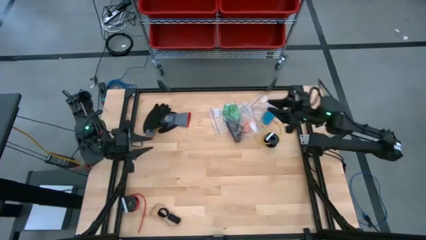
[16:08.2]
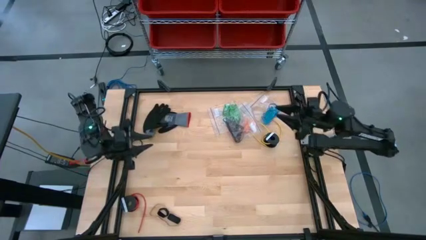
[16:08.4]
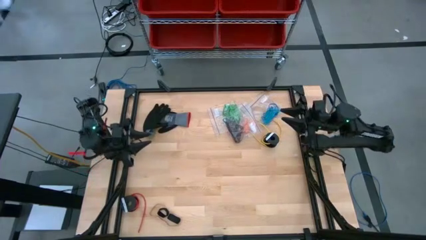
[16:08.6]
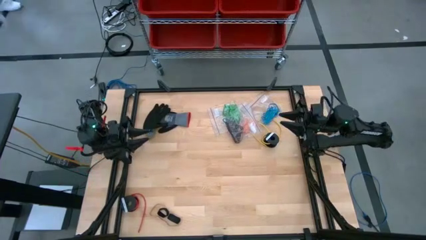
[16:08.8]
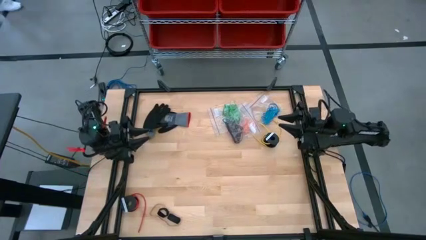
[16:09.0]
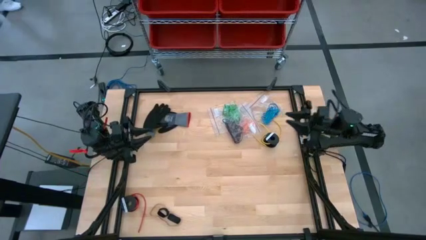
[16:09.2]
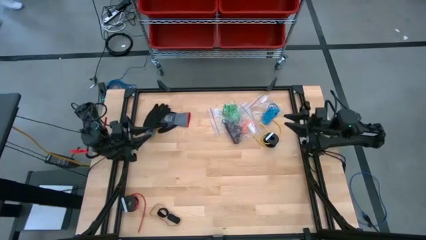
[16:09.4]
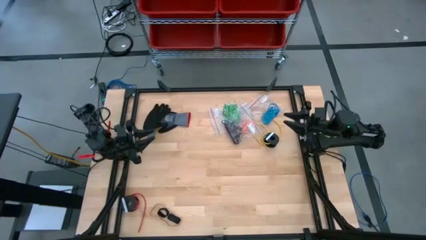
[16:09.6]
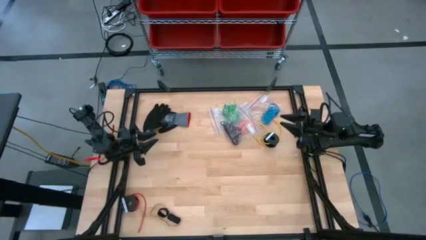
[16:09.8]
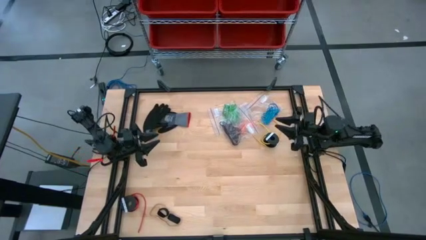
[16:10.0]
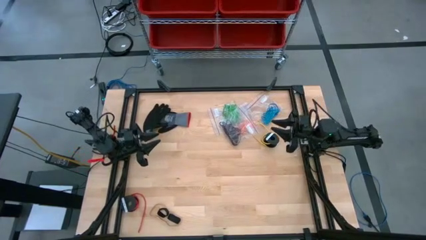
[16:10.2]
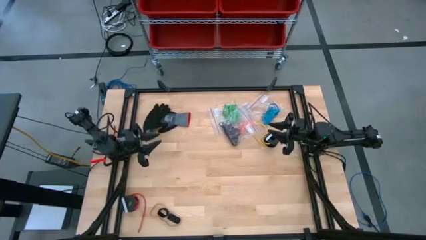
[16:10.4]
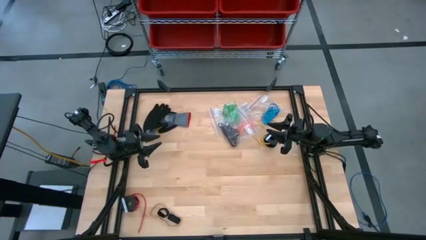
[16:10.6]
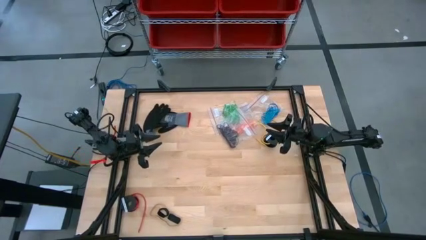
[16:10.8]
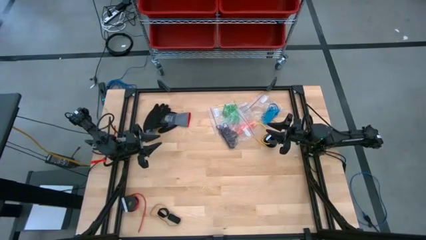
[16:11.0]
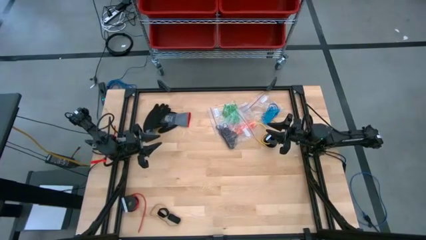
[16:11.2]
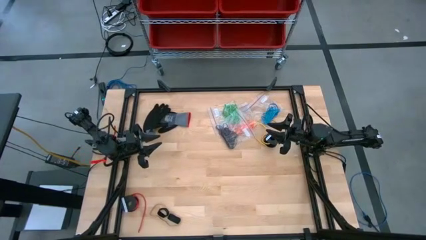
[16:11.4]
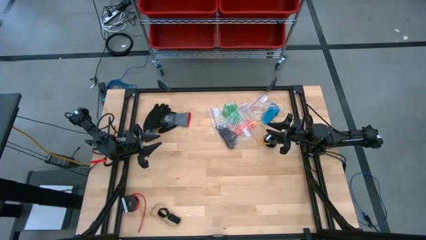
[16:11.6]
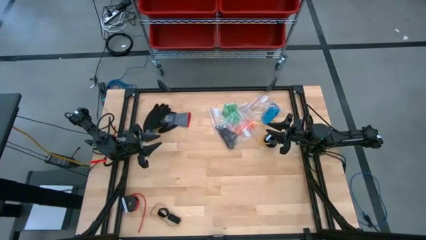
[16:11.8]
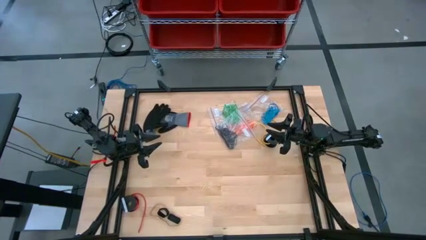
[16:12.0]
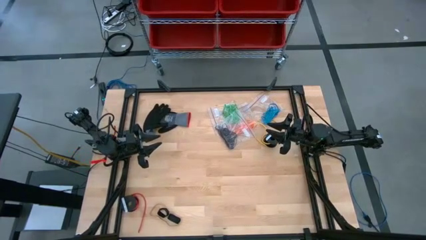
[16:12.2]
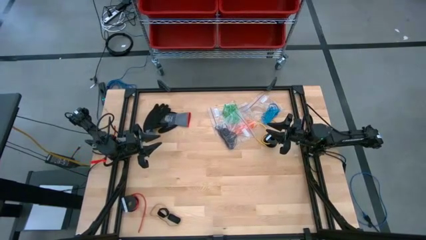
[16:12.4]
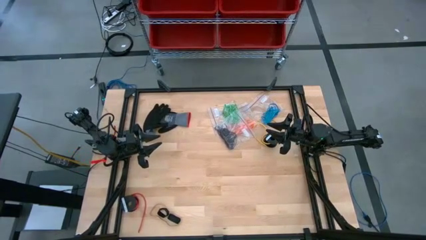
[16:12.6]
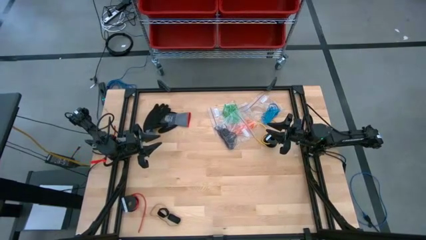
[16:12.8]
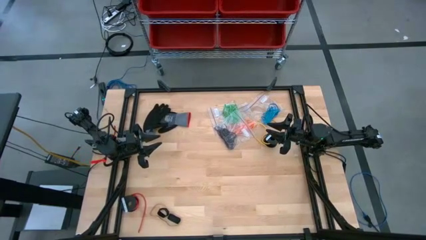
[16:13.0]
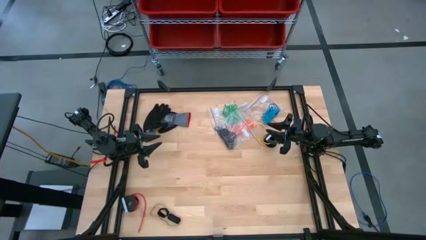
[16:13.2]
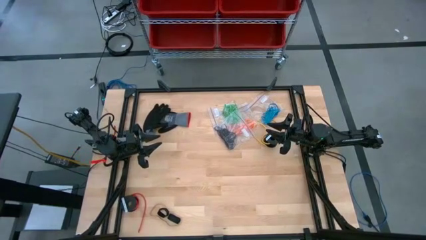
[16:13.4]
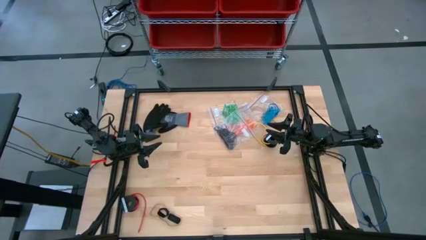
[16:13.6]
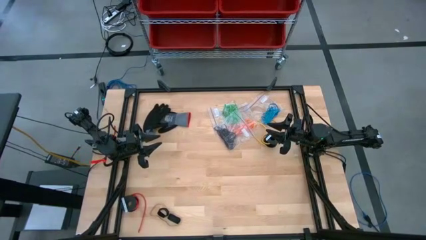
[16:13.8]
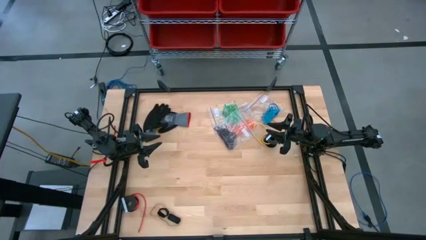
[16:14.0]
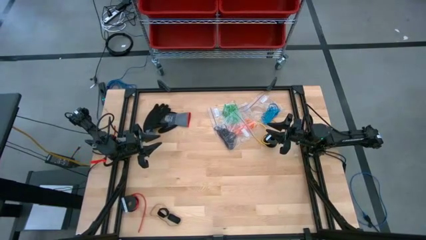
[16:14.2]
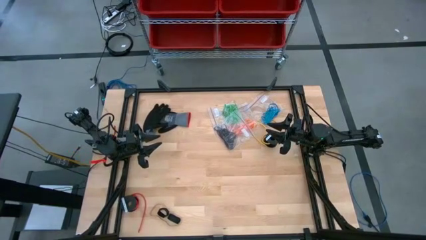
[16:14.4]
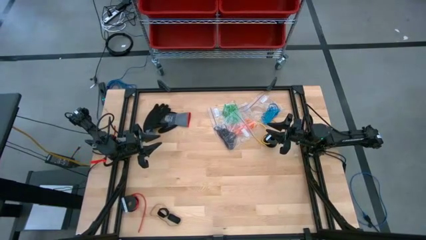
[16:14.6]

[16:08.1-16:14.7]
Task: Sort rubber bands
Return to Home Position

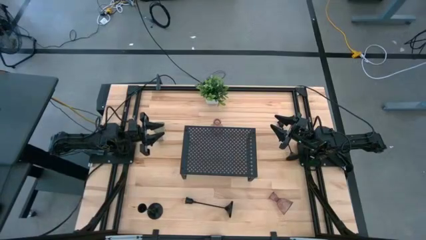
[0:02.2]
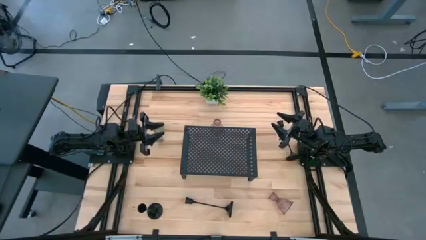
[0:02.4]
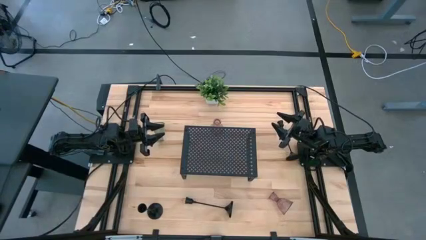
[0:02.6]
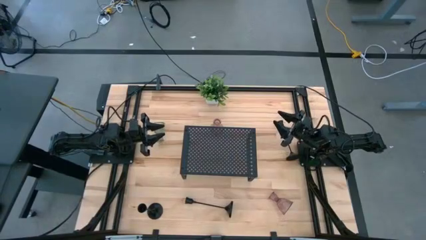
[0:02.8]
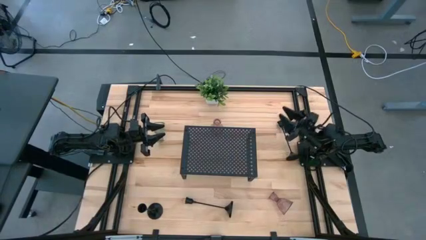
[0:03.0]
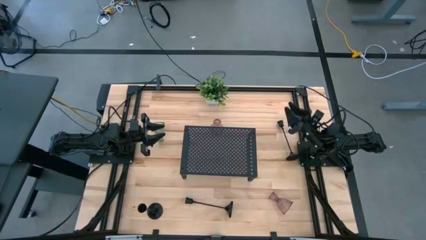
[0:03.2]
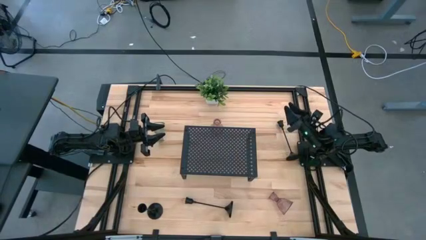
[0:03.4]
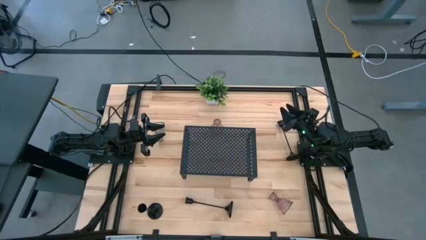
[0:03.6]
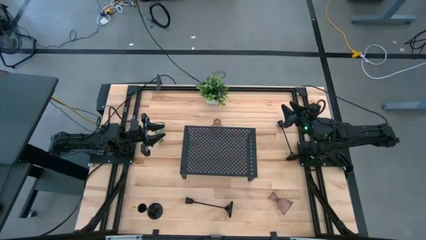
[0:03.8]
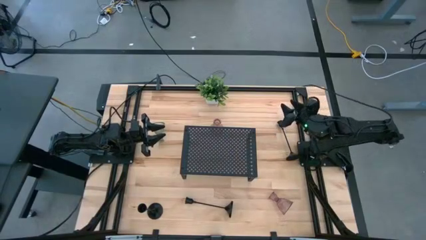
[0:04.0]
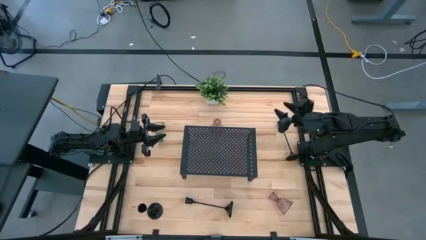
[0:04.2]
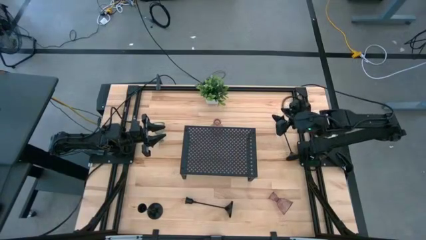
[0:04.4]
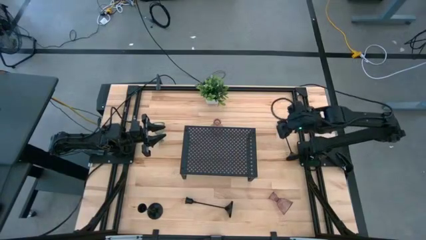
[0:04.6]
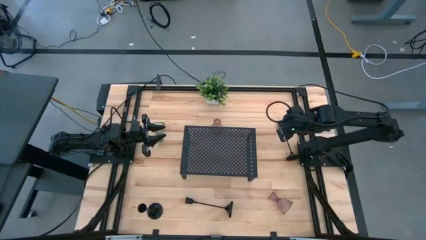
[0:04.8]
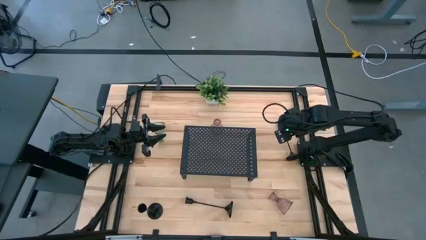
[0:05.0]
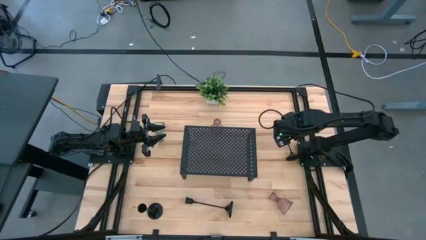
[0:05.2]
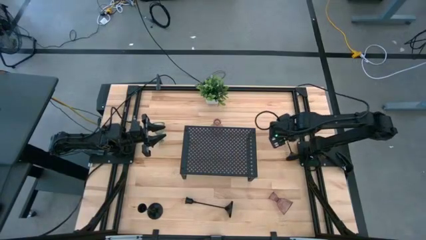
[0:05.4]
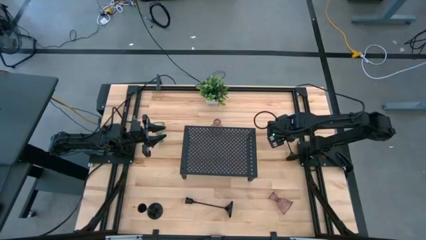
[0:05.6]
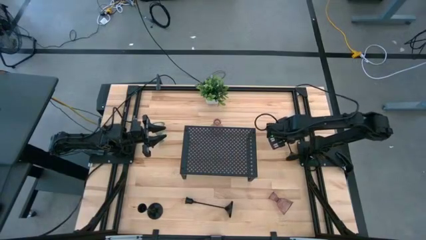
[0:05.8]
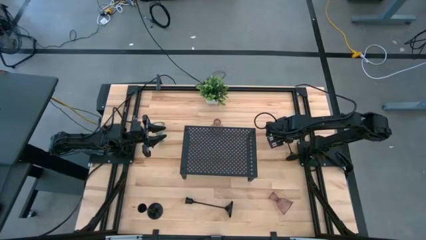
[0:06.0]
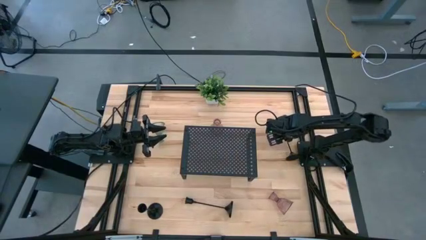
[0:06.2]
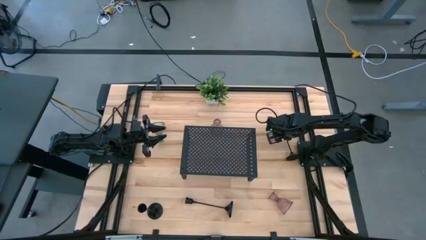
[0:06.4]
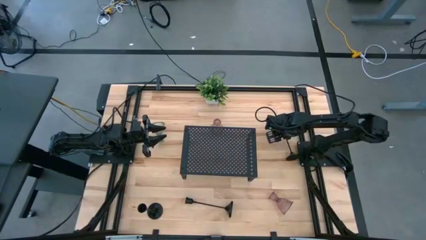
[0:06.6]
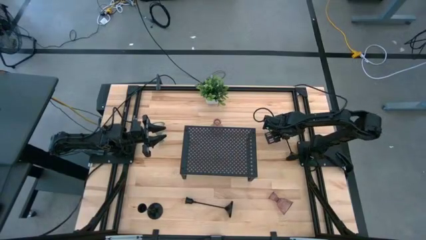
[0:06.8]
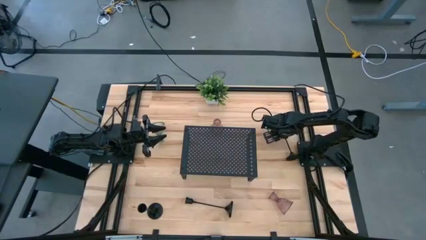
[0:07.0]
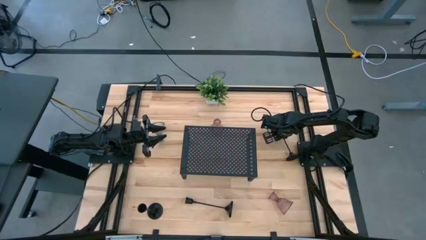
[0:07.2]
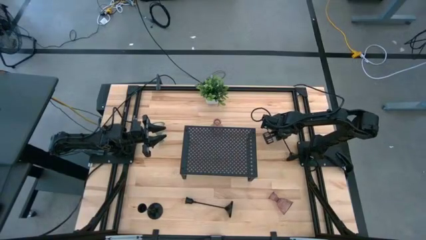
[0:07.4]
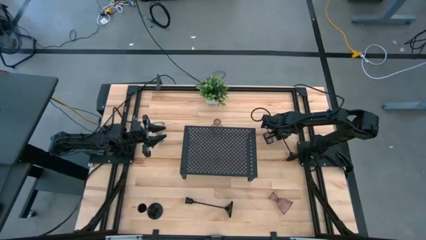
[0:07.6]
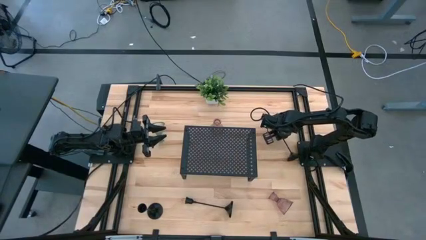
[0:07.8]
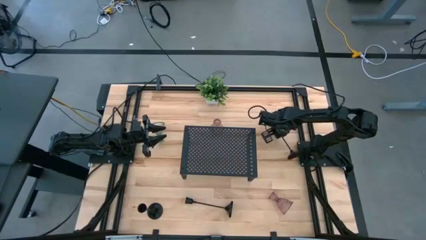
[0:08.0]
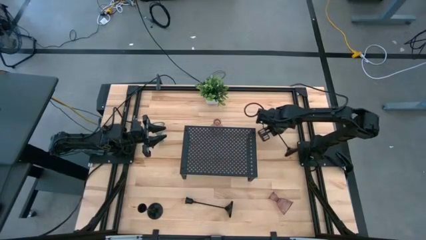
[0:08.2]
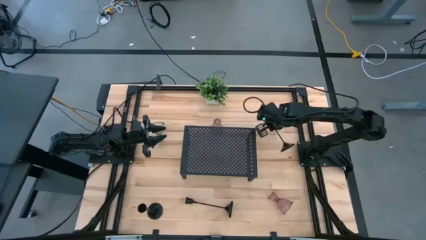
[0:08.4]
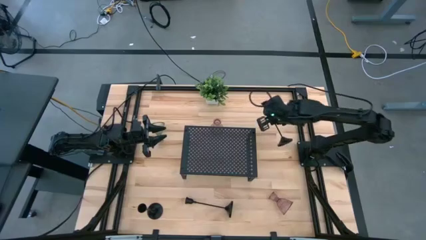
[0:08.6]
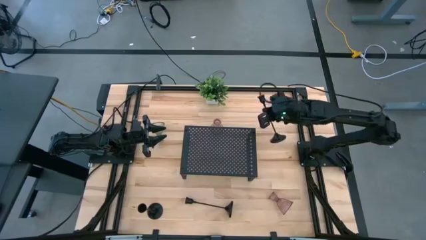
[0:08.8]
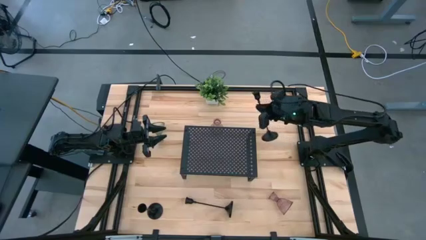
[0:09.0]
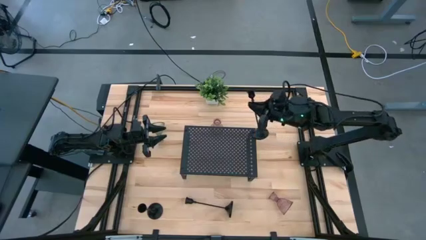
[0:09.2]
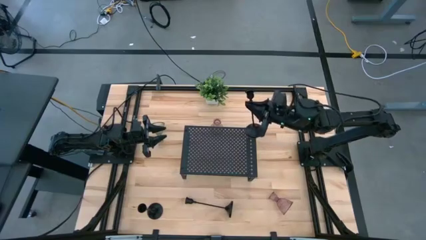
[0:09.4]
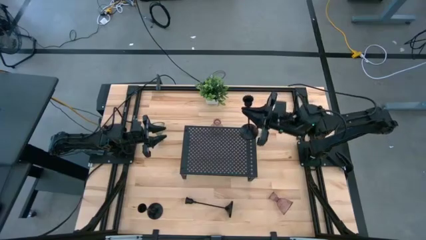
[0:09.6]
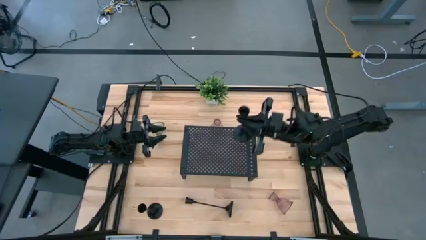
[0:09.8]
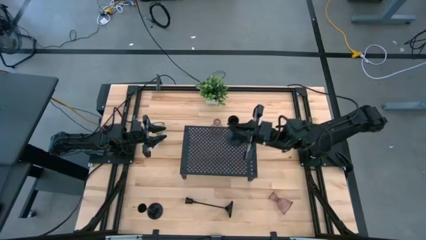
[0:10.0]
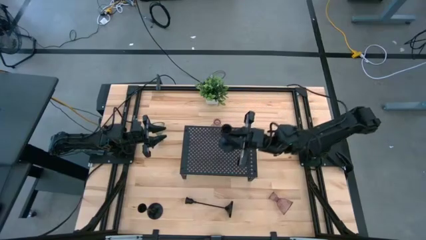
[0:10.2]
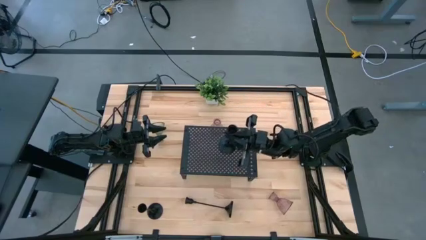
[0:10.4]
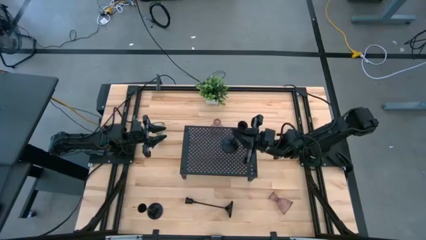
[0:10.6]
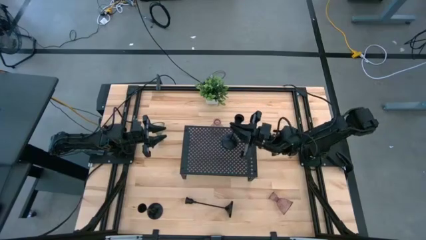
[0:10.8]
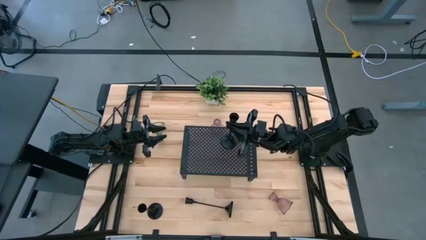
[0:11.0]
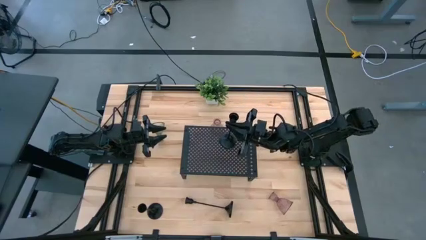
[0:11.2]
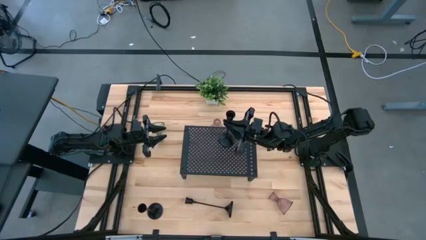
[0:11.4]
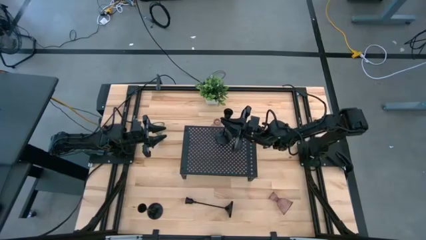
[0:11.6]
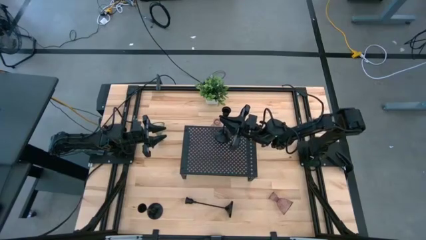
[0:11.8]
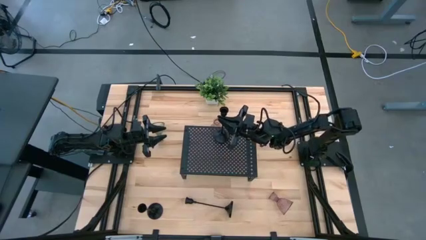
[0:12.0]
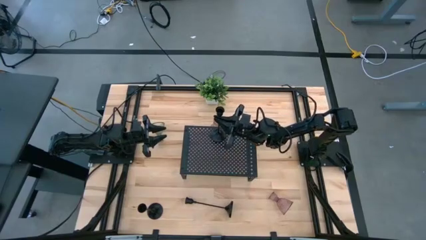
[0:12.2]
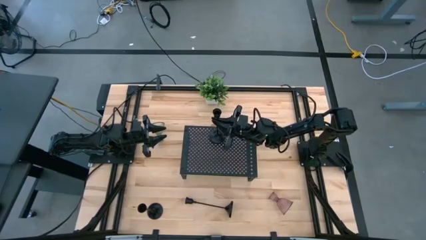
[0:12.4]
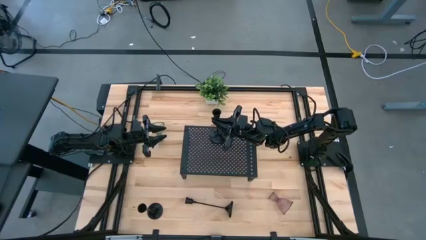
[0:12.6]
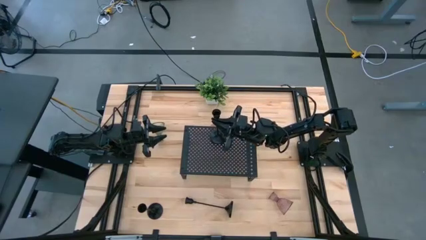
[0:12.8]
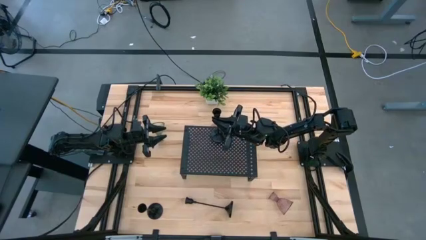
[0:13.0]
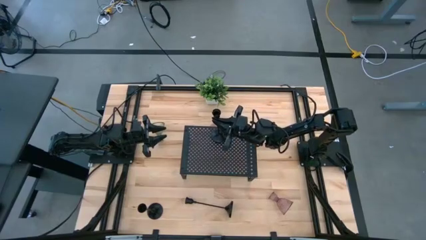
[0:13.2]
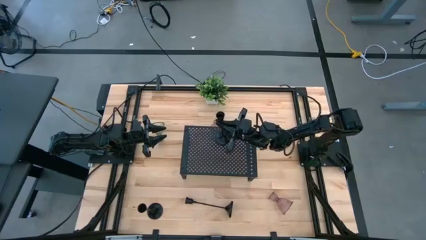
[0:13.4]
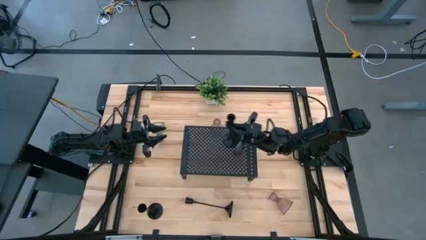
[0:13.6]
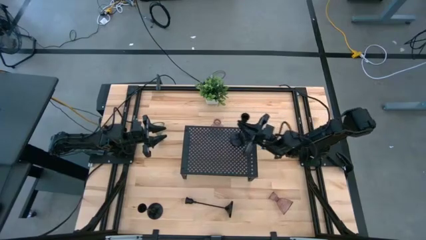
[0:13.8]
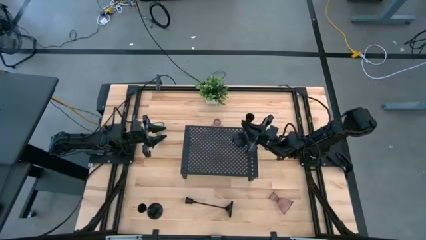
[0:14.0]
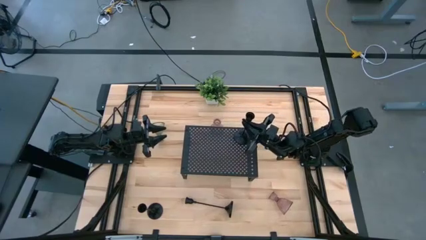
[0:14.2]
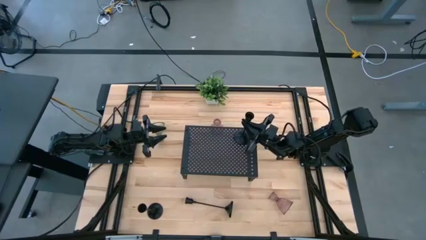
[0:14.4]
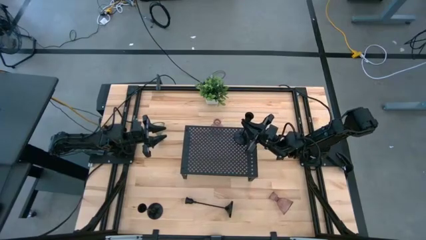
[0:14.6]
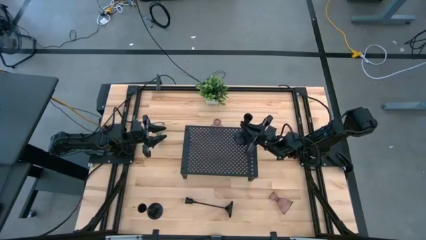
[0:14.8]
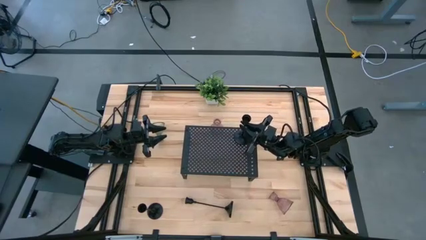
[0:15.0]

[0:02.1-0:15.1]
Task: Pick & Place candle stick holders
Put the top black candle holder on the shelf
